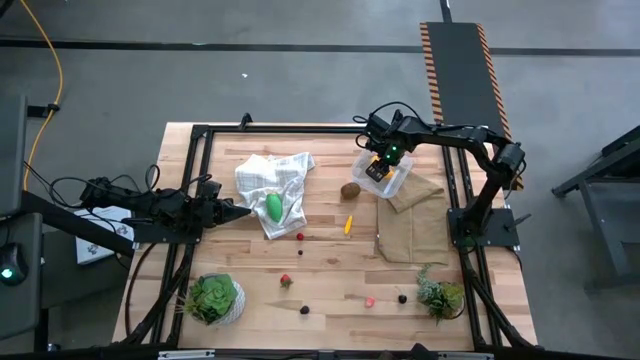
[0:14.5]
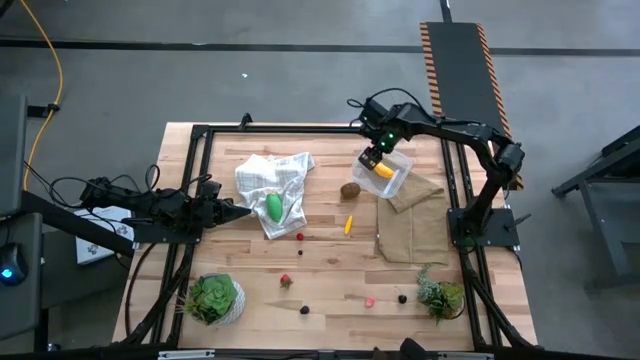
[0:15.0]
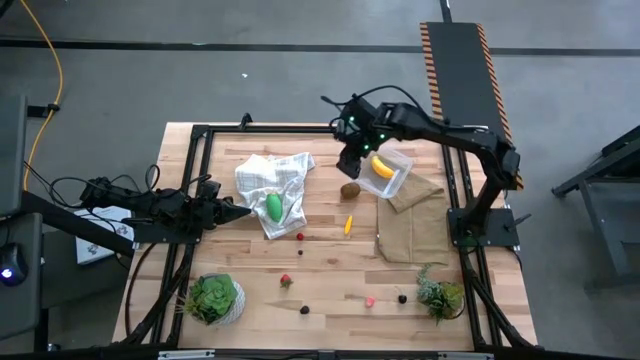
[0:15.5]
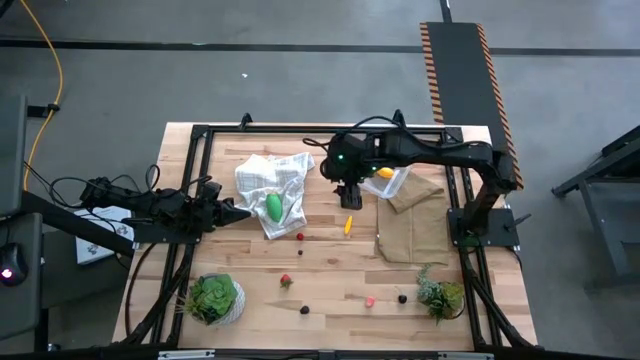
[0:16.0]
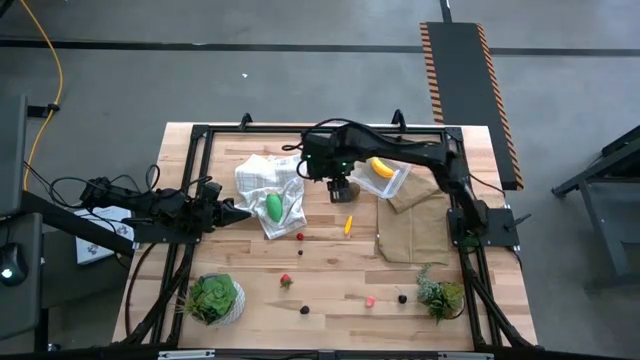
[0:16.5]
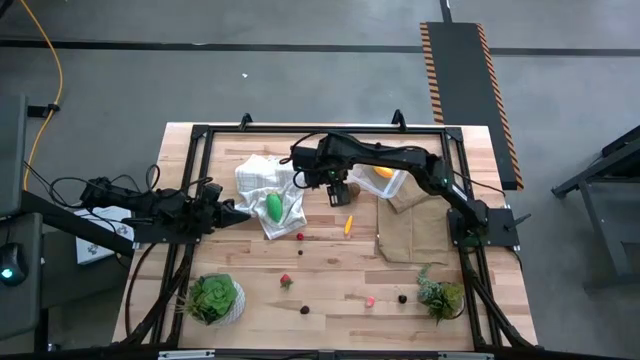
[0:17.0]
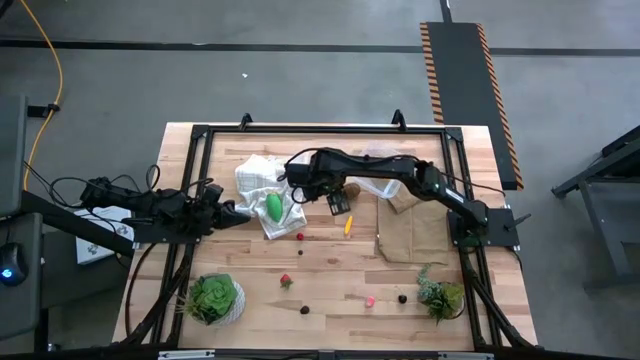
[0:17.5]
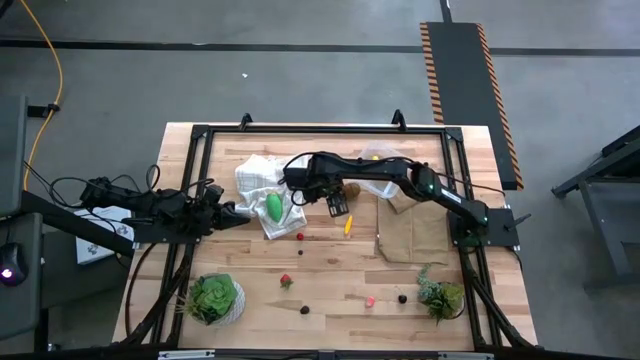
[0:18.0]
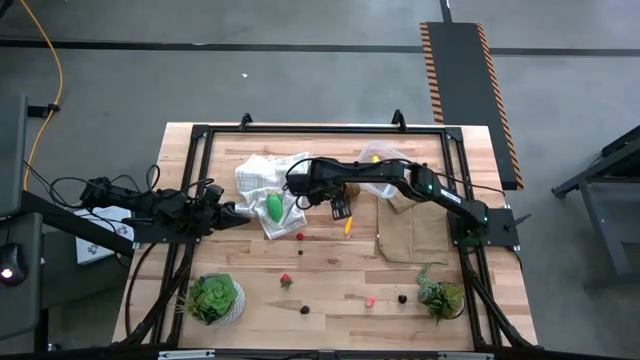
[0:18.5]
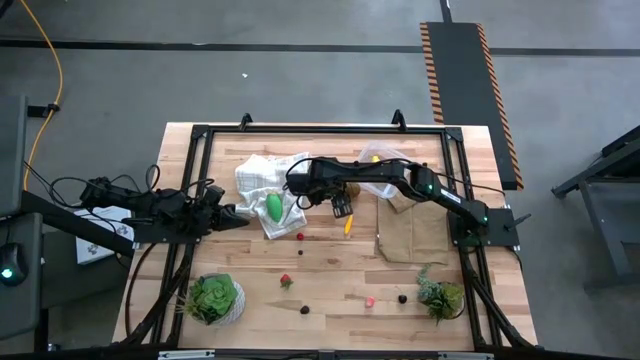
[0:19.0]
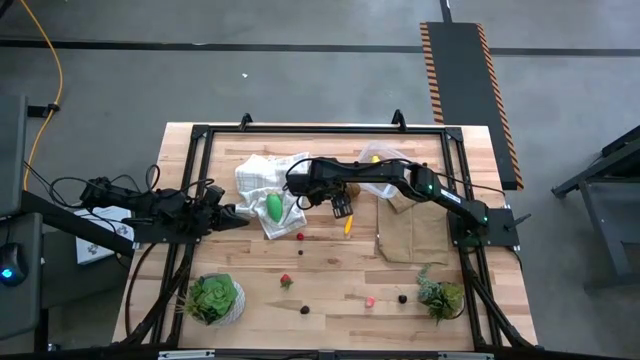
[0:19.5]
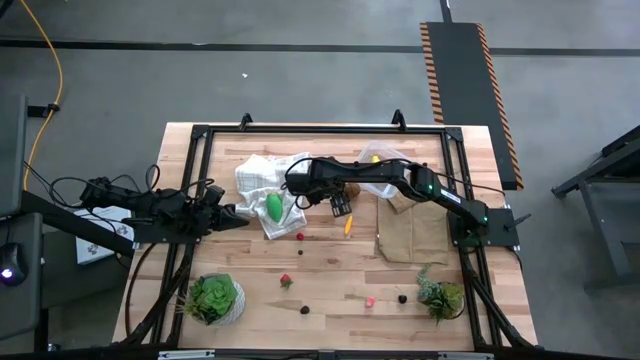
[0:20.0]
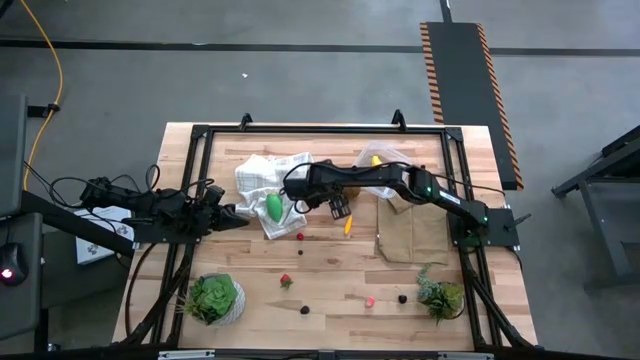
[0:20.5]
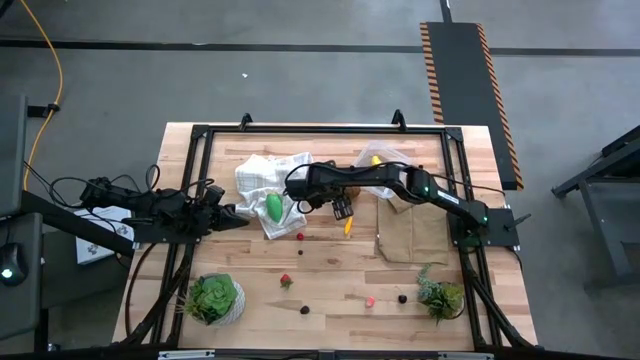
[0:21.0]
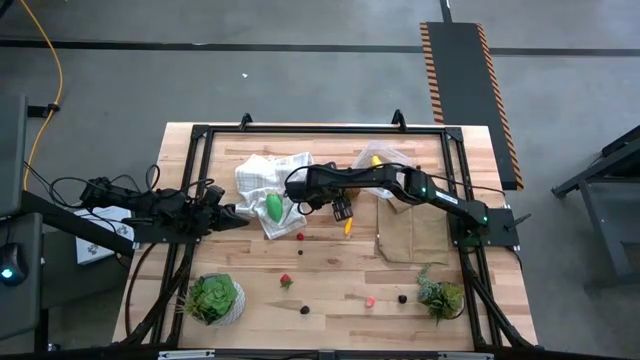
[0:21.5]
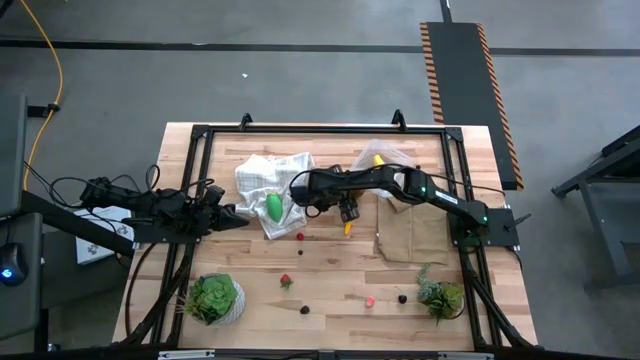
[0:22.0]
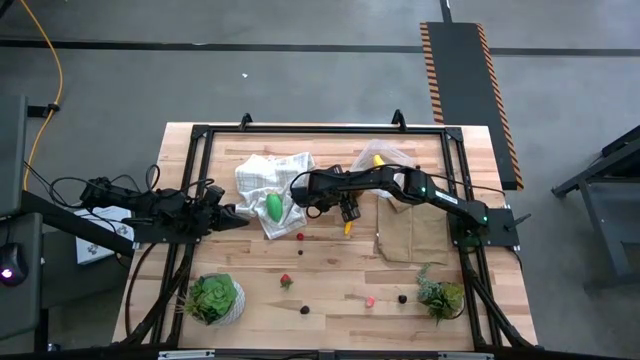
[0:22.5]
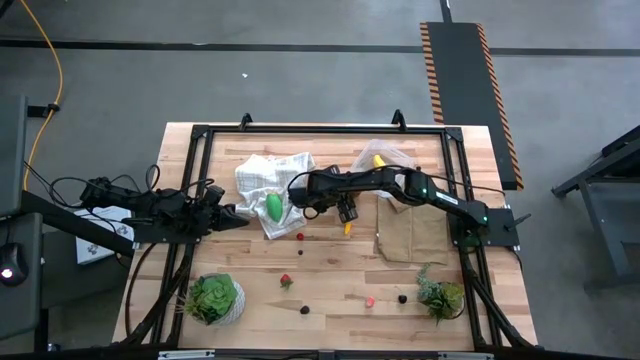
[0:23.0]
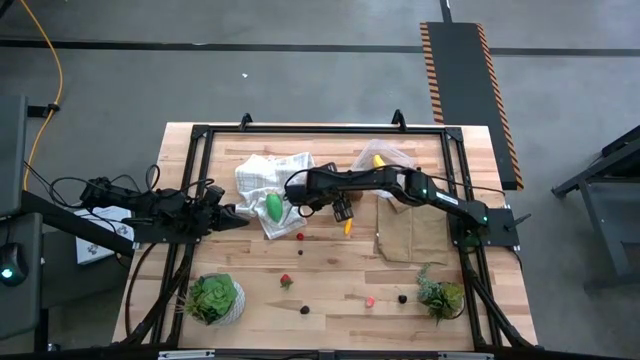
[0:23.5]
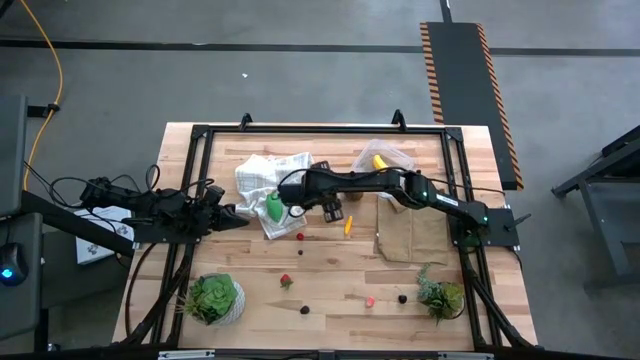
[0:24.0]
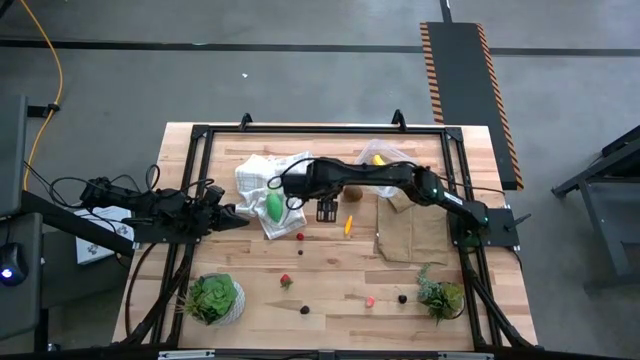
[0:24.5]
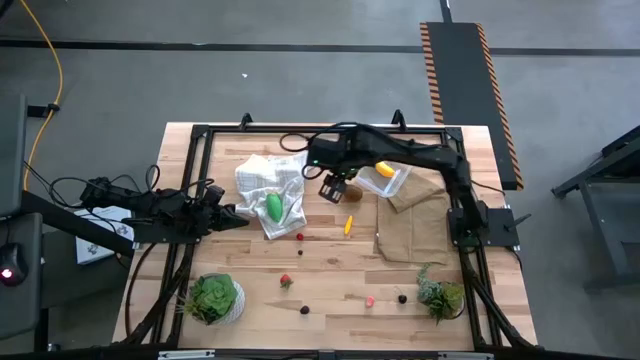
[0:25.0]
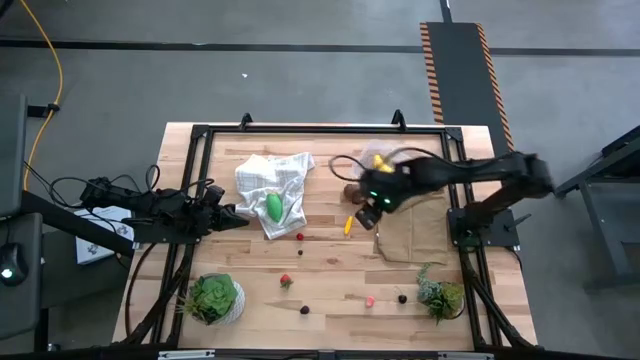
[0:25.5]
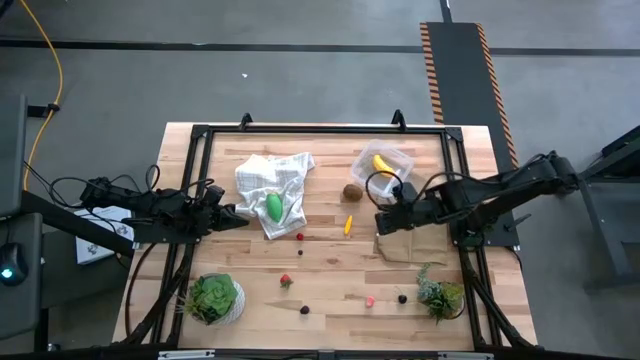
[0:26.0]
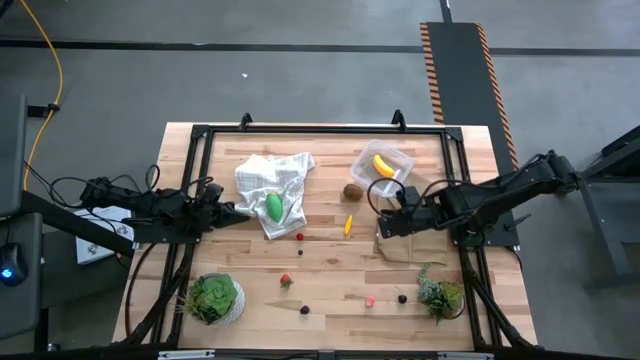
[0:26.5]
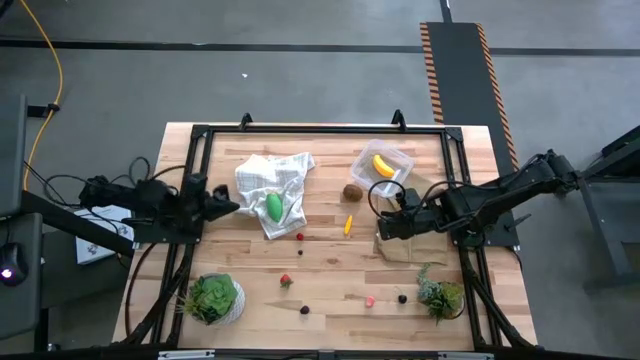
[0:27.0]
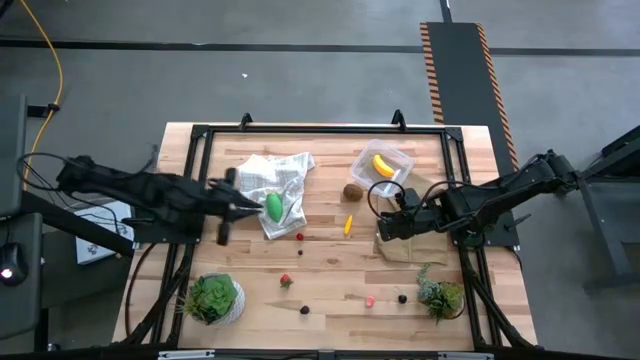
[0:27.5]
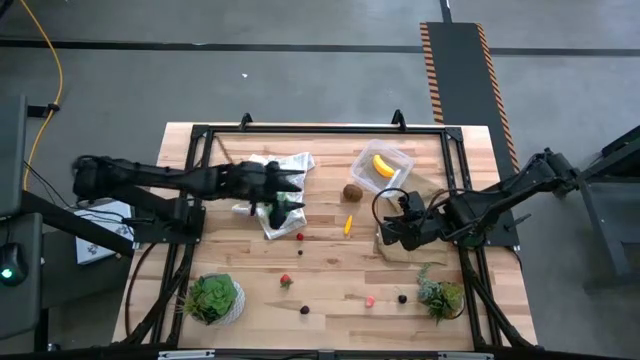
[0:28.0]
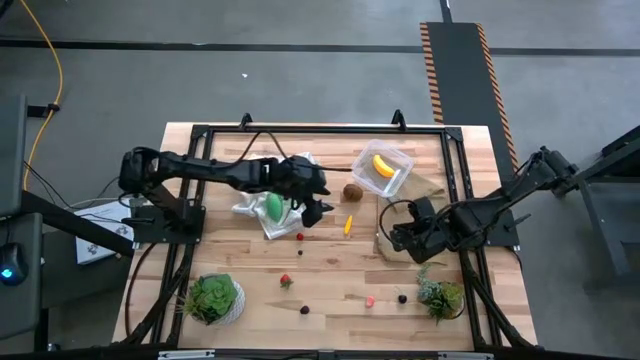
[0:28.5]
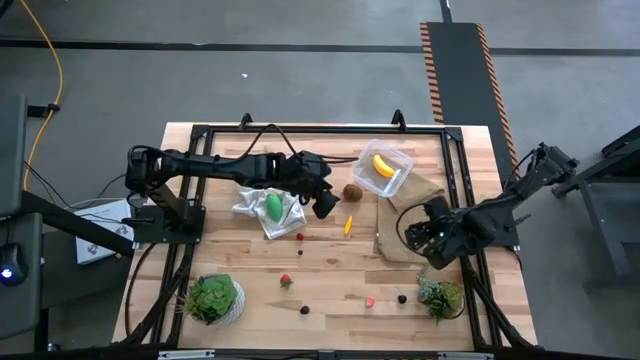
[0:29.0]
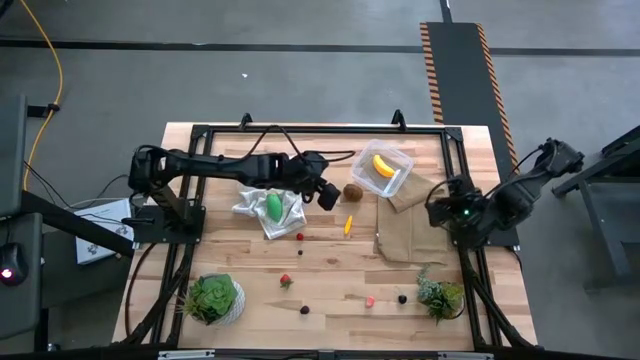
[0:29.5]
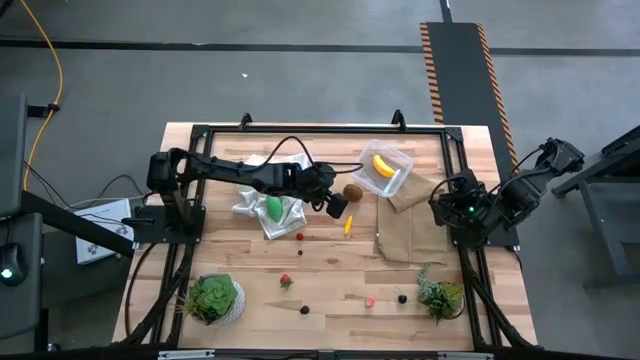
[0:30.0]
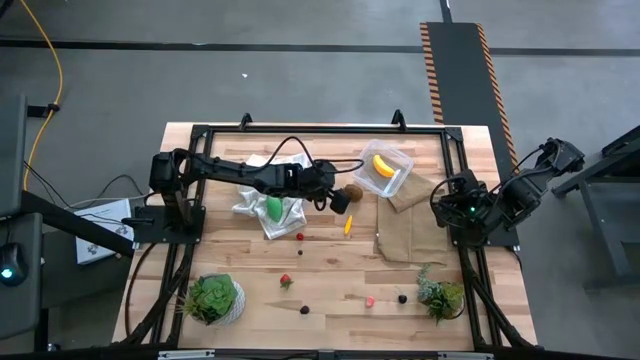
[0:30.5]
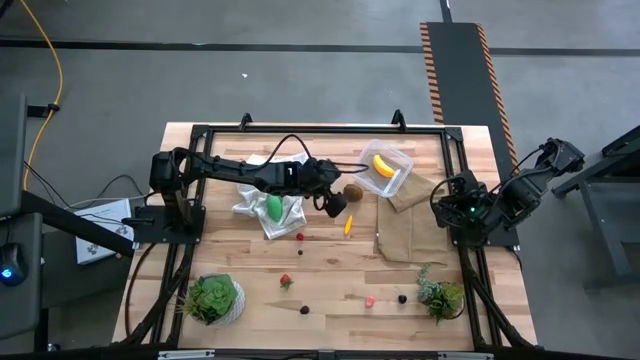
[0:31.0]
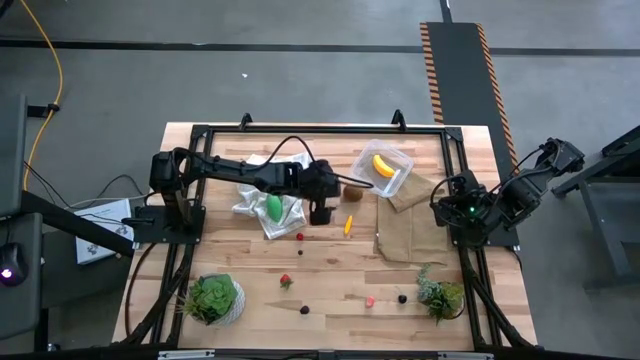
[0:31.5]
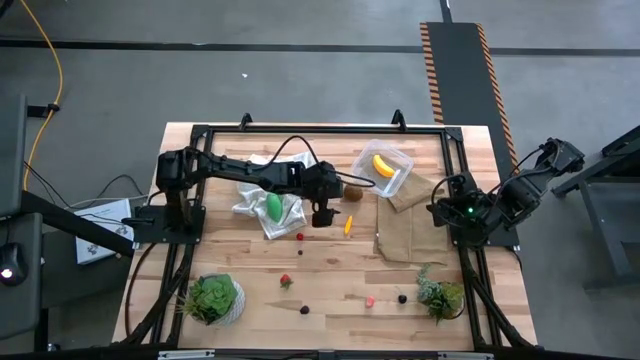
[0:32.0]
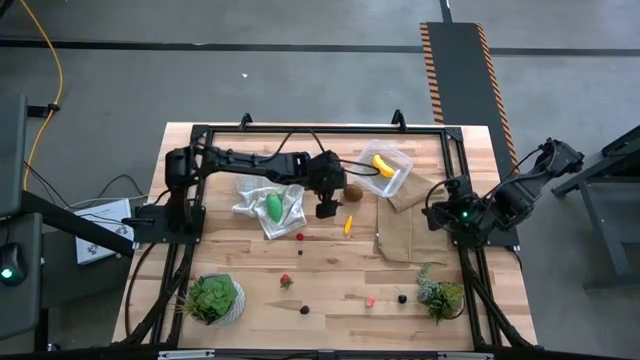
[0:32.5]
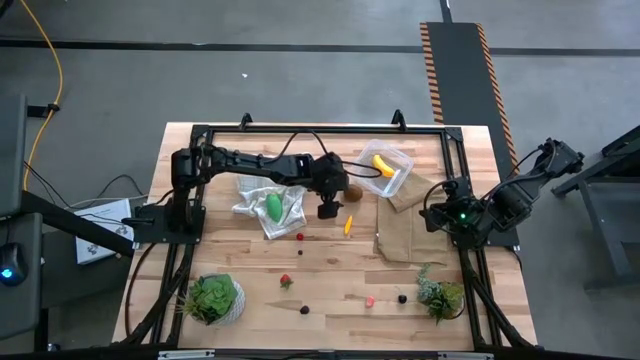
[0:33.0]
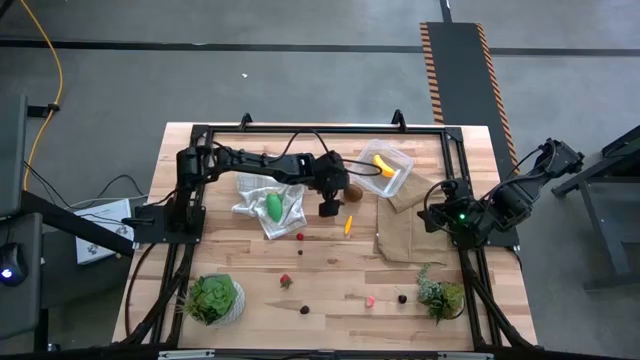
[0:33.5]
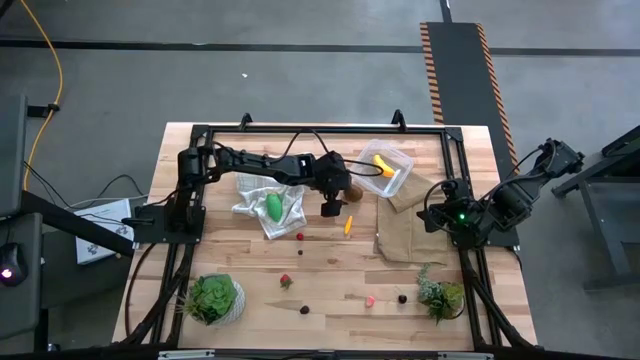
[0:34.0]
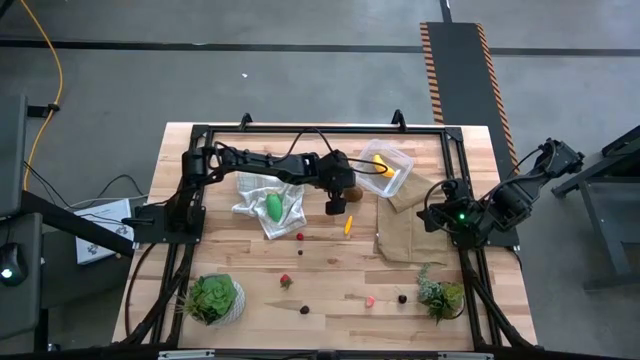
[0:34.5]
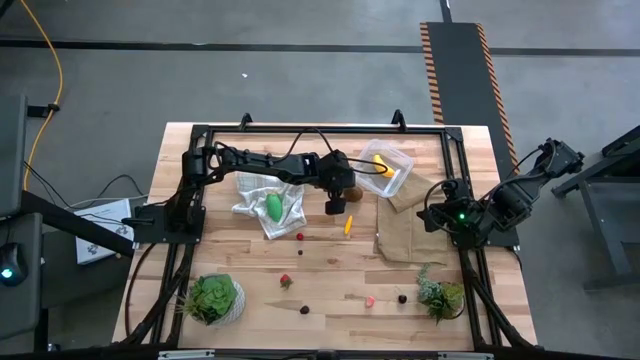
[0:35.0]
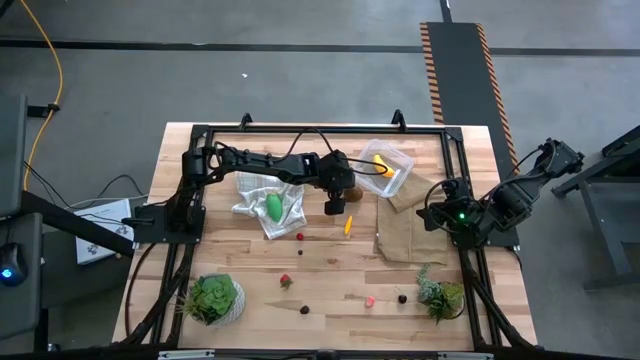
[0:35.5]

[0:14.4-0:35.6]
Task: Pick and placing Produce into tupperware
Put the brown kiwi into the transparent bin
